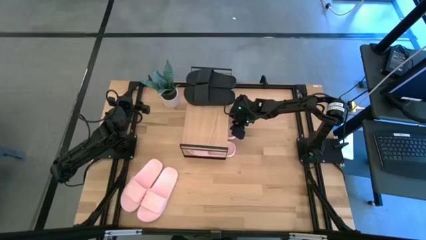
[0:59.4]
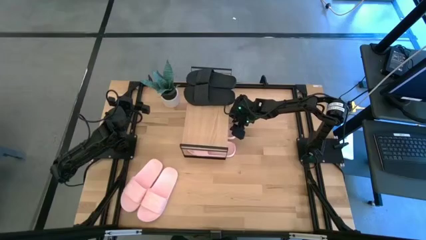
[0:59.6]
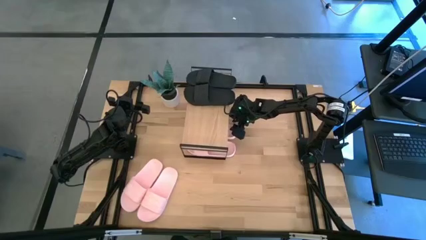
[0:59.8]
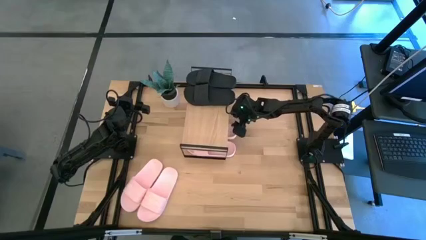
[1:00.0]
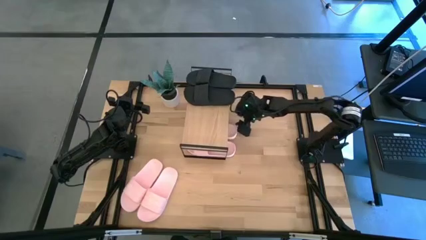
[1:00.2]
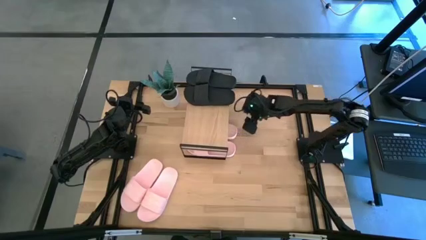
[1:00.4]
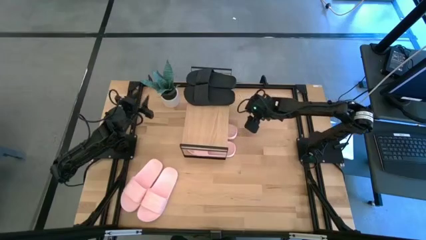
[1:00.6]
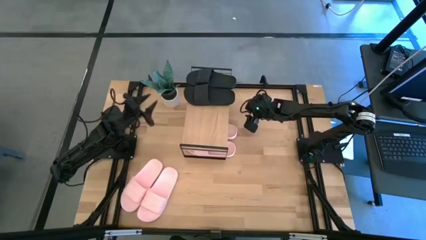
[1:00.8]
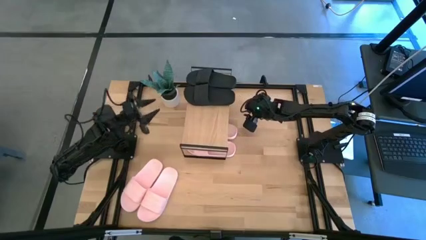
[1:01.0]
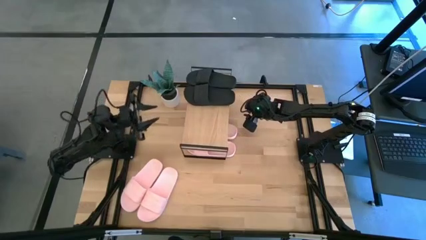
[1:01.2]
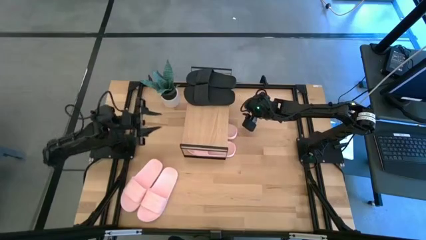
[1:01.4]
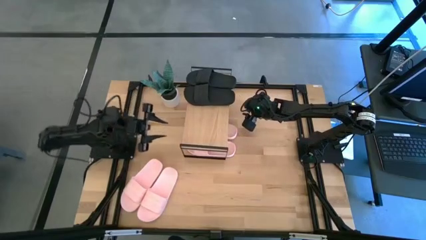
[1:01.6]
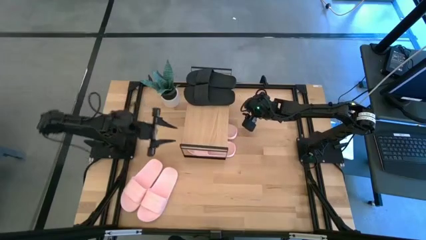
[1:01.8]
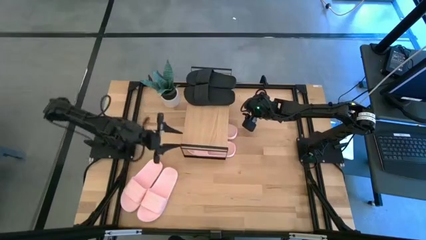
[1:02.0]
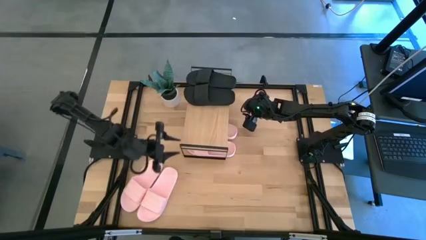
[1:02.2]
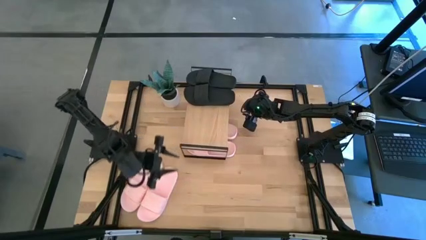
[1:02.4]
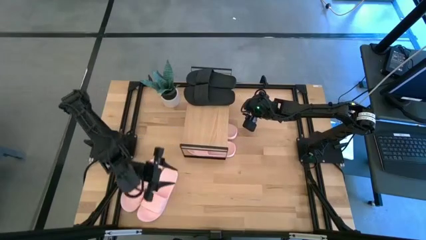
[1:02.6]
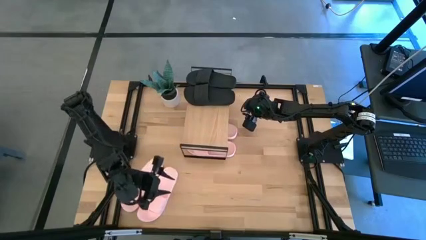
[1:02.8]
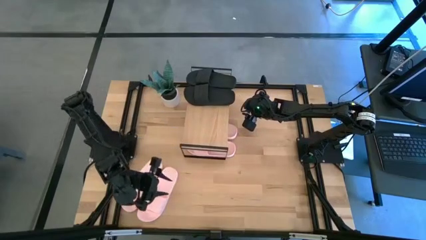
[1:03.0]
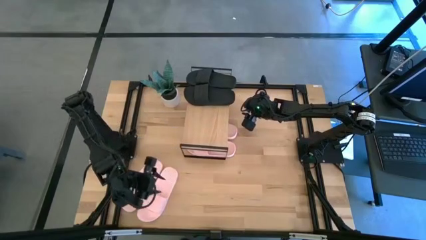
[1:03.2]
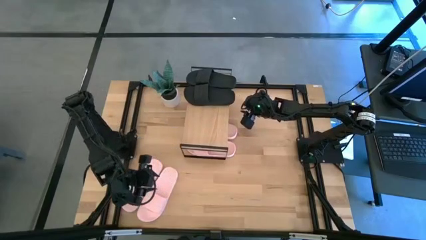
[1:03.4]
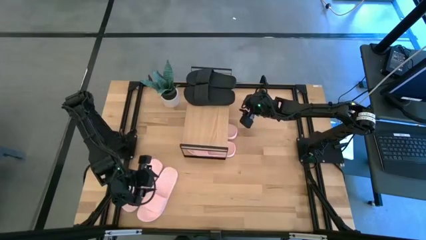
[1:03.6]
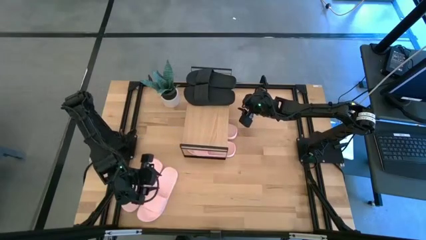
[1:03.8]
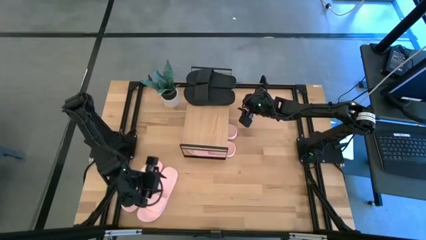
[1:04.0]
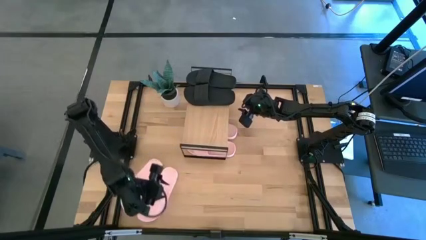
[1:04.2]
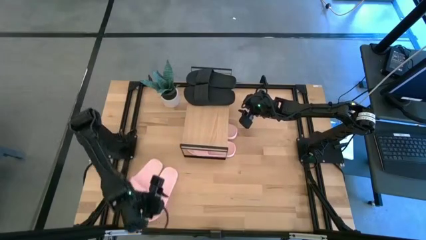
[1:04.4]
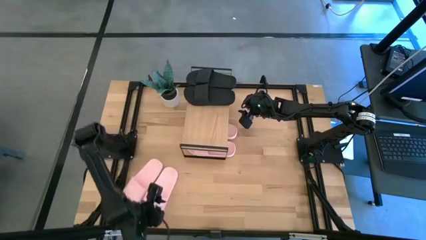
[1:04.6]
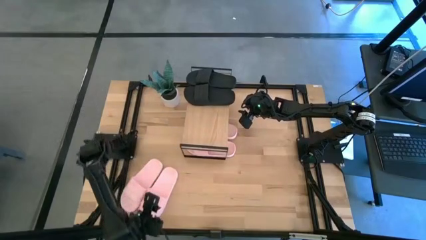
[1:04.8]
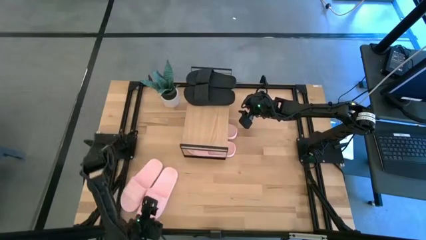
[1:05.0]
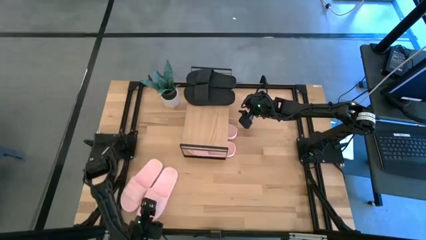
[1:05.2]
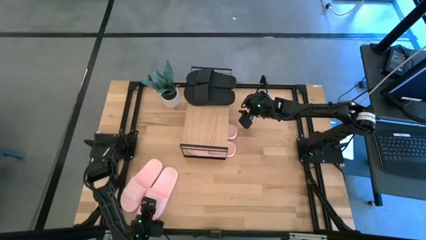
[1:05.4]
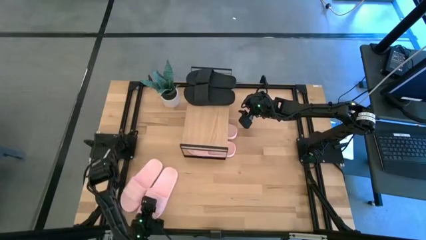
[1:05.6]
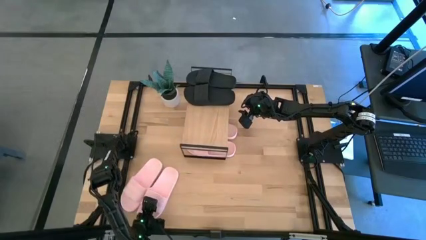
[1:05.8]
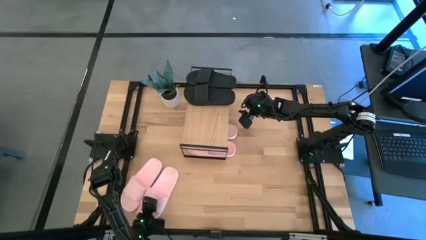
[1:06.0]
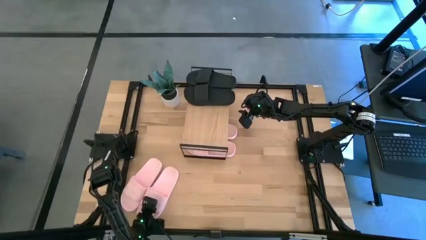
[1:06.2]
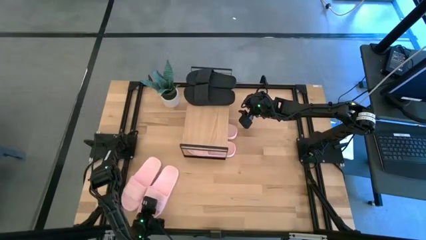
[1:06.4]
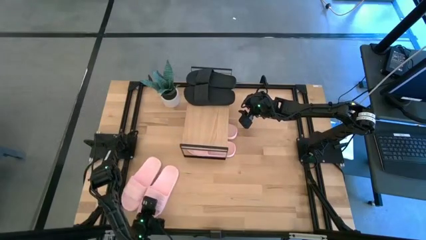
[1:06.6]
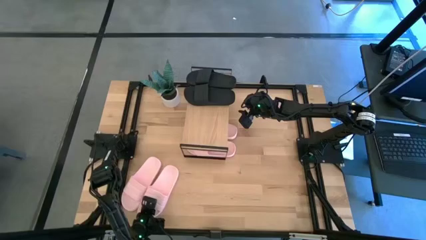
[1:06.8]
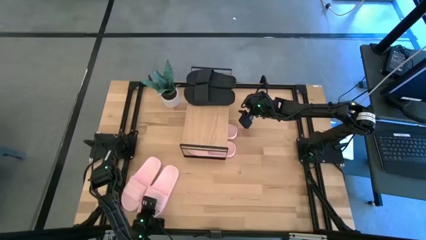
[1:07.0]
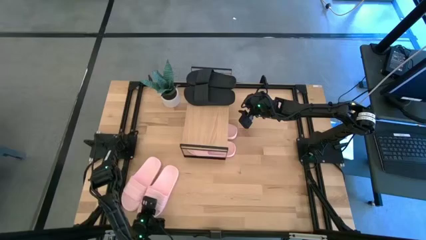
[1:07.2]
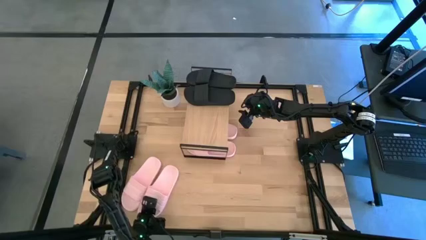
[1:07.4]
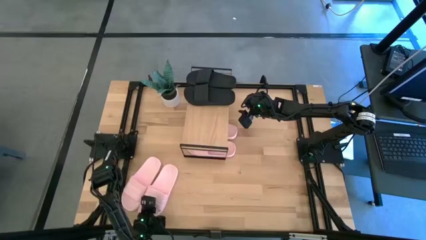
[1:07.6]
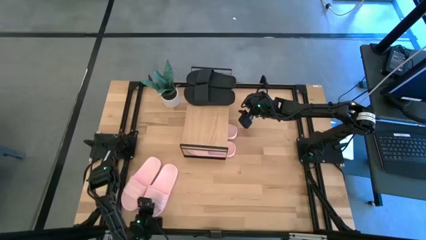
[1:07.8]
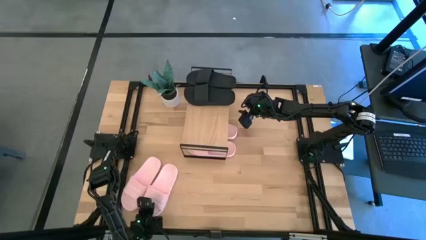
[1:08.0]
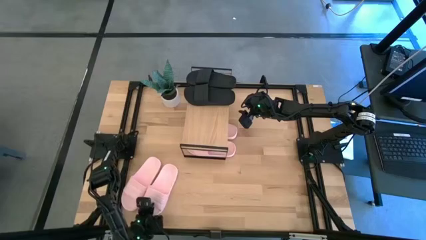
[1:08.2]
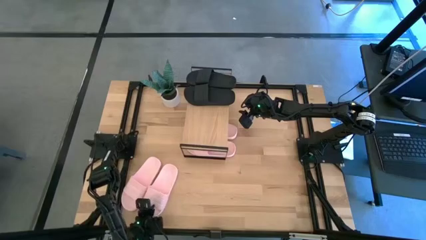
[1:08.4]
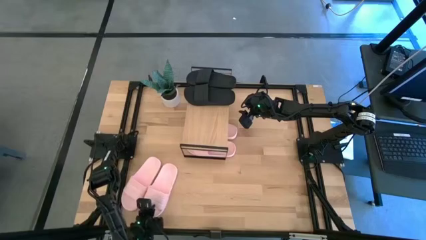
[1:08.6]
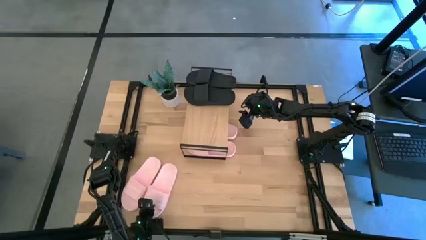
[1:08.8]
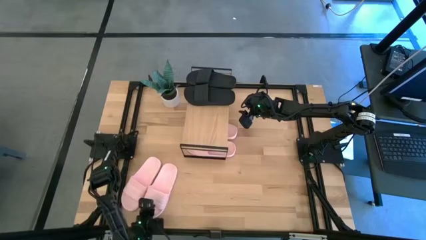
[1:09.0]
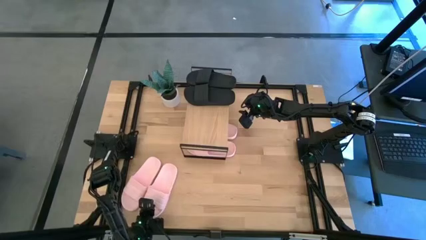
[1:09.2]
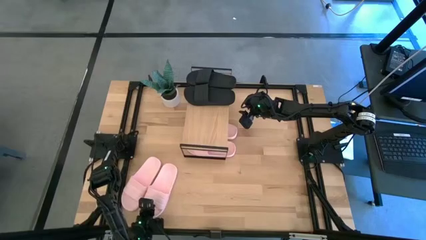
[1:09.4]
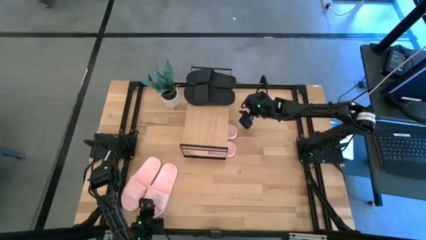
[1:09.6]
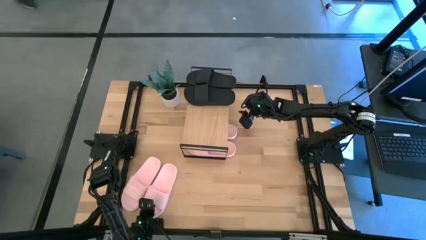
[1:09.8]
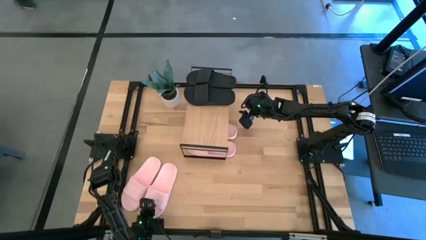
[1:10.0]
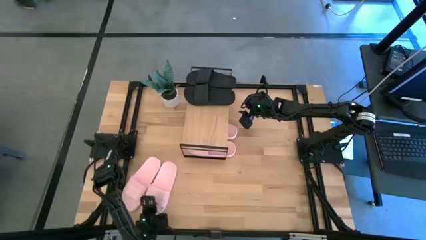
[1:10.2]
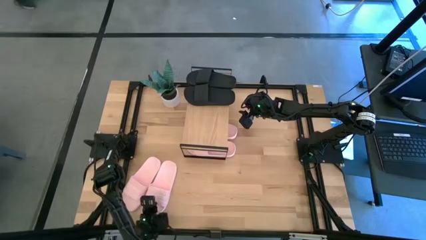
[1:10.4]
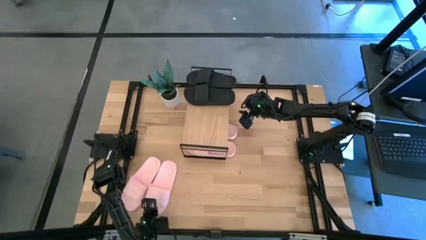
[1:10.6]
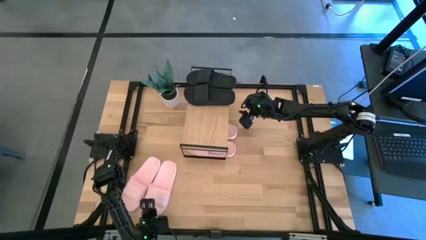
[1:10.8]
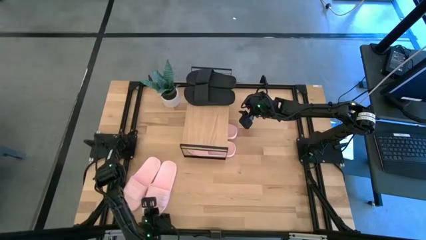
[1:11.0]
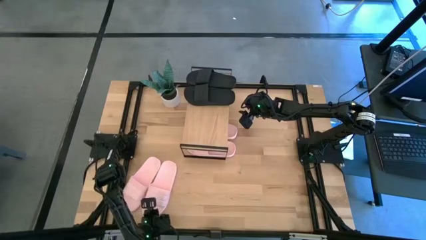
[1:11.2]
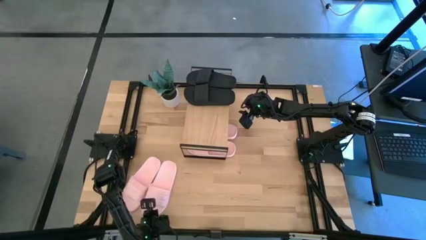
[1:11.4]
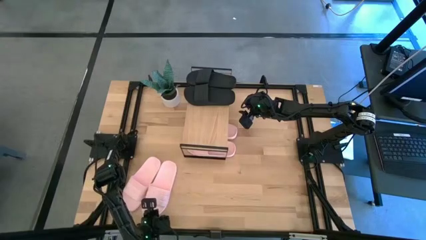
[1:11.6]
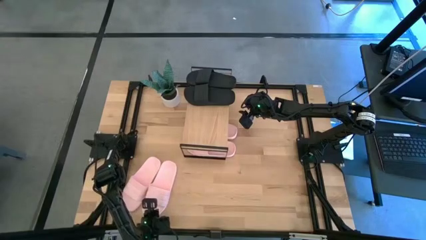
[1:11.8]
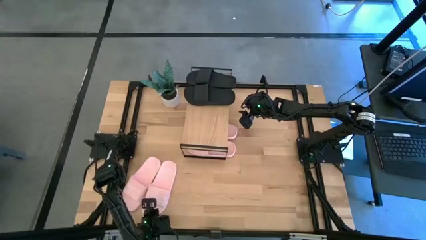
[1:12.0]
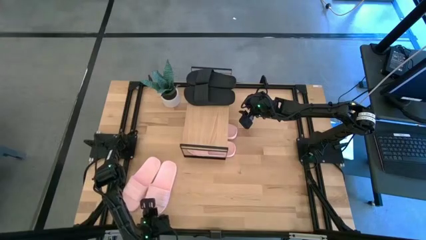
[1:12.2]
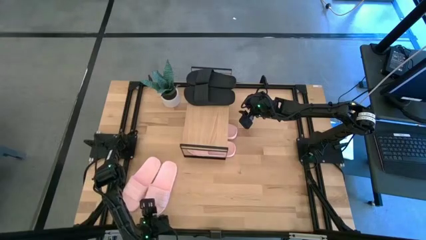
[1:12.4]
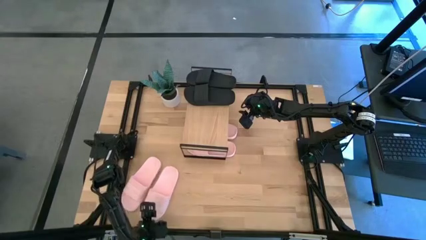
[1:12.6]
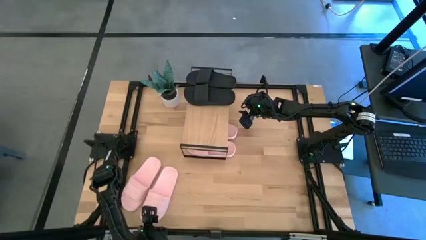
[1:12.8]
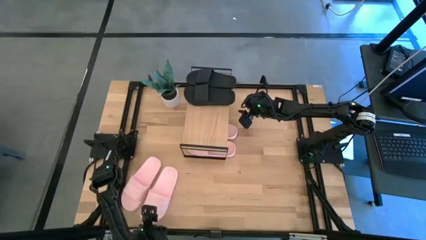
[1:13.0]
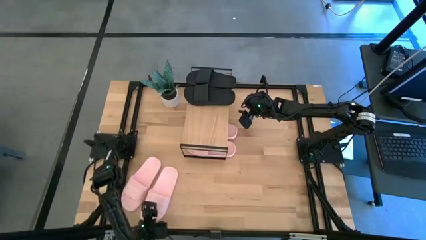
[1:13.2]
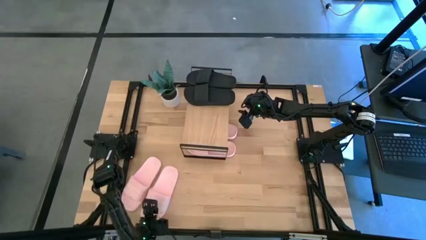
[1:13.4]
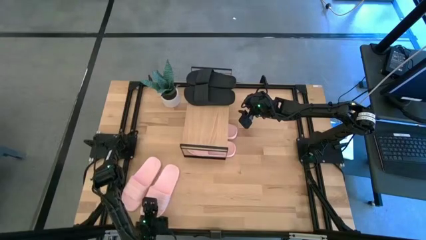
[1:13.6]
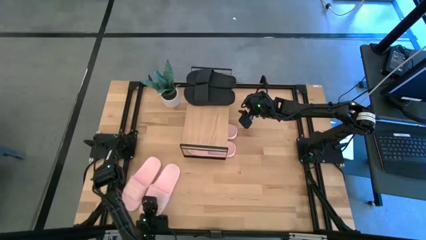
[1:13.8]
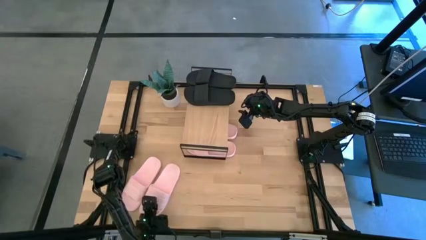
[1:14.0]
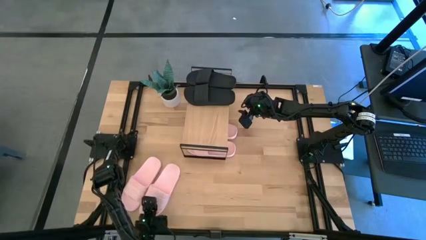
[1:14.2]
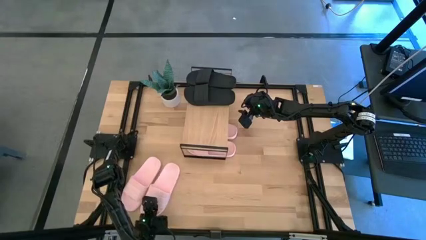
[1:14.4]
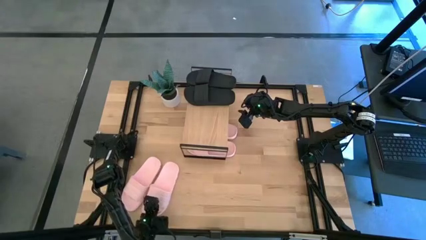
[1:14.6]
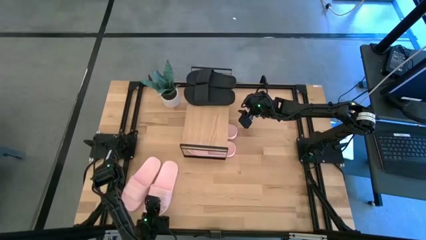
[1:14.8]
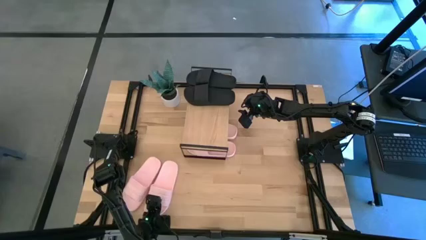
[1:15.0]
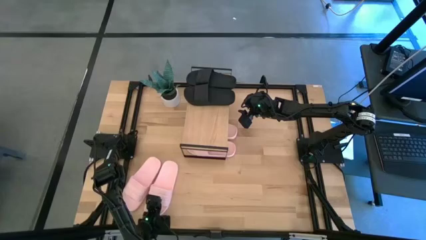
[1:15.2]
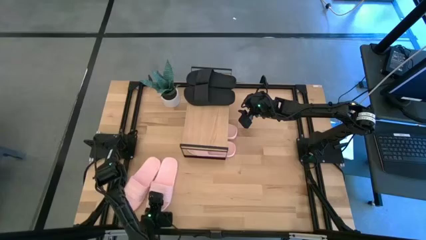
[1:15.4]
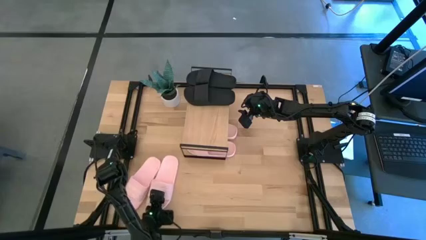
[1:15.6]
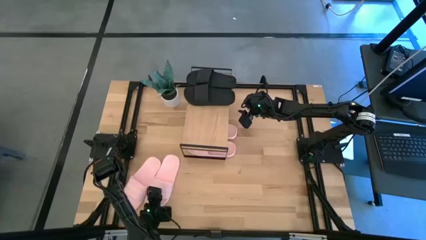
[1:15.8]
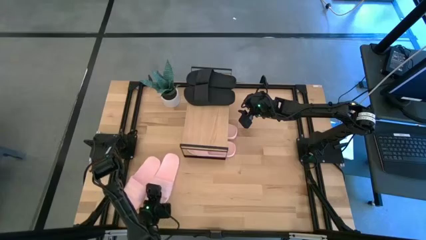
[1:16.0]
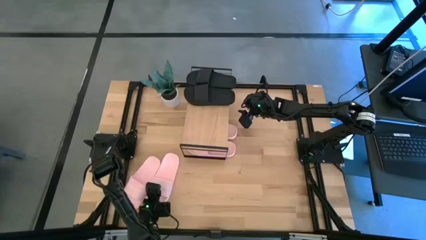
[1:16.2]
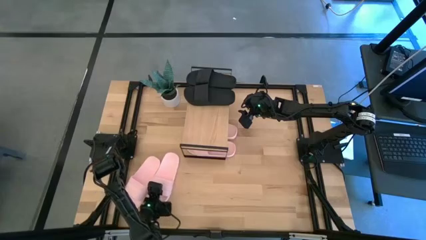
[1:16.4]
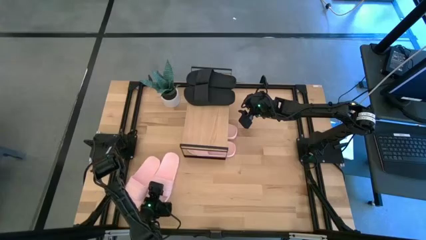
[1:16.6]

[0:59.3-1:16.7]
Task: Pick and place slides into the shelf
Put the pink slide under the shelf
